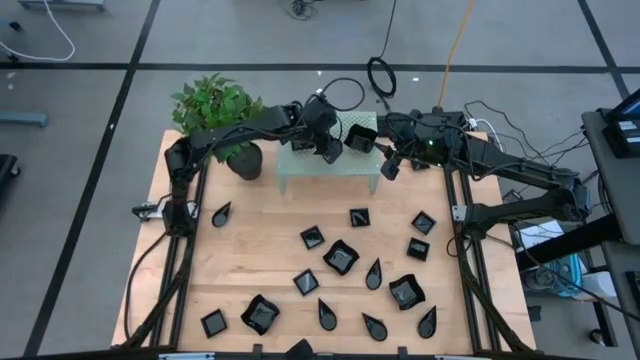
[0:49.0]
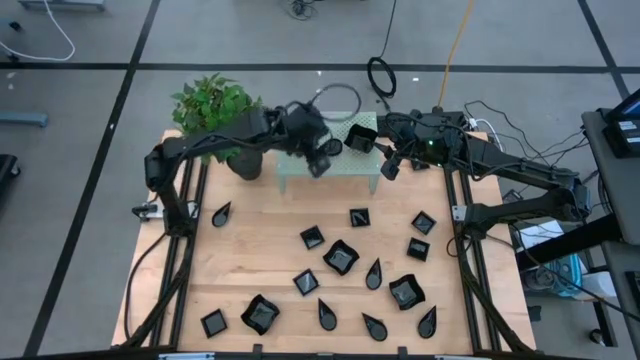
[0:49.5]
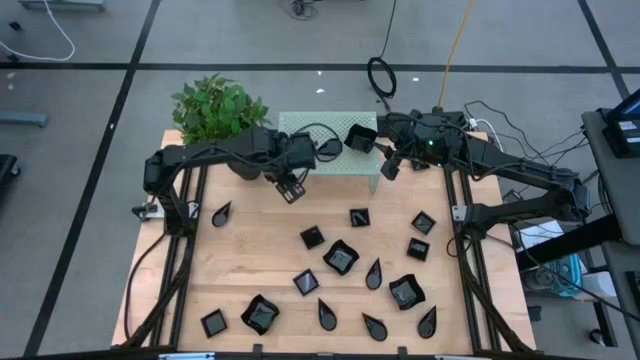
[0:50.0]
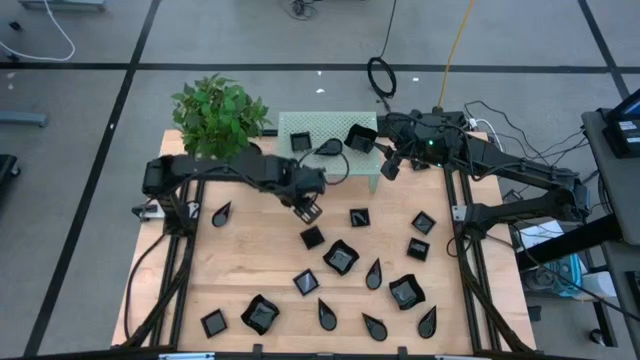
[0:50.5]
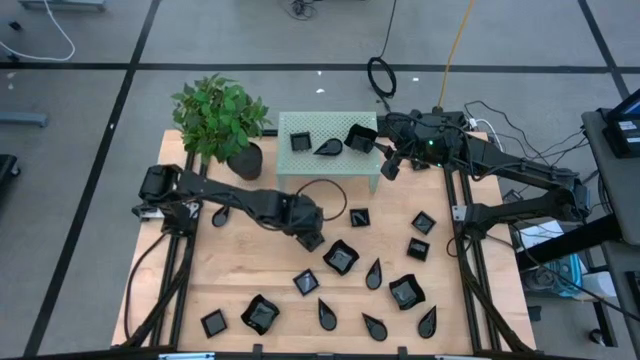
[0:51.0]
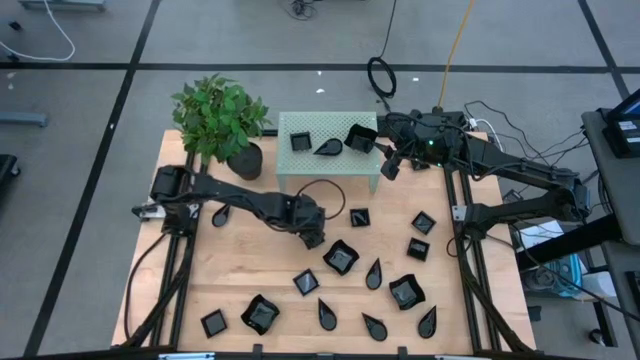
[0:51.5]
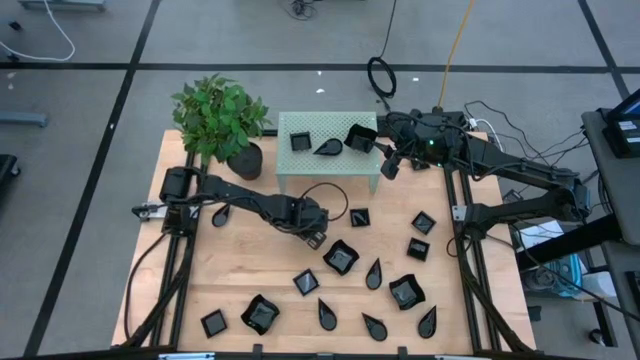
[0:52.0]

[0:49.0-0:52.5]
Task: Pick & Place Mini shaped plates
Stack the square plate on top of the other square plate on the shelf

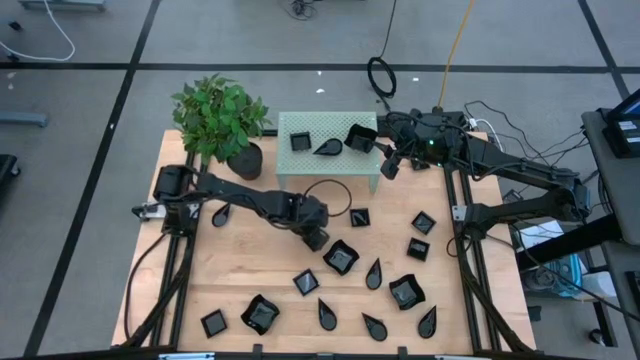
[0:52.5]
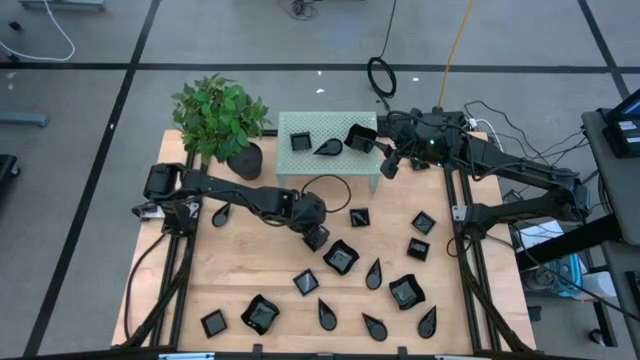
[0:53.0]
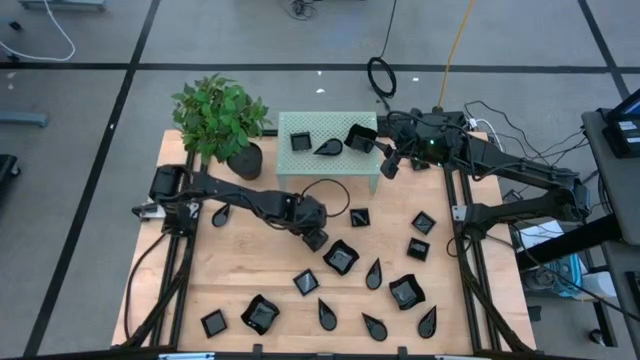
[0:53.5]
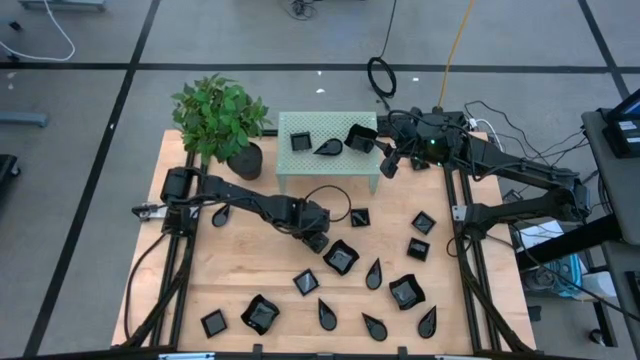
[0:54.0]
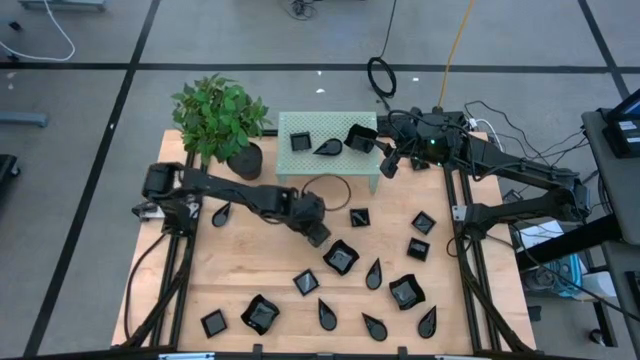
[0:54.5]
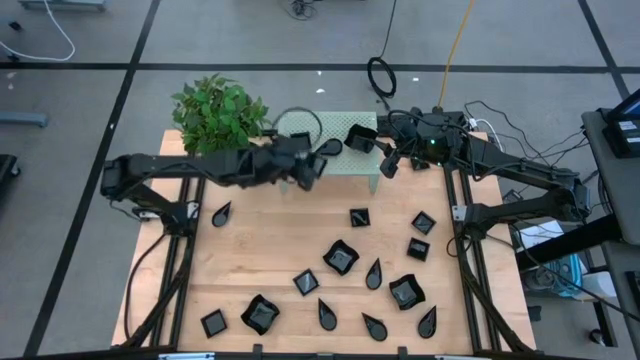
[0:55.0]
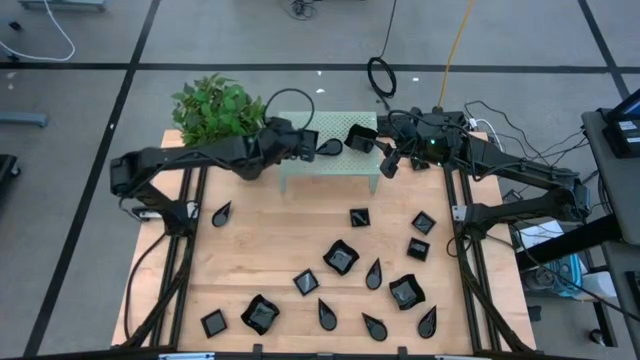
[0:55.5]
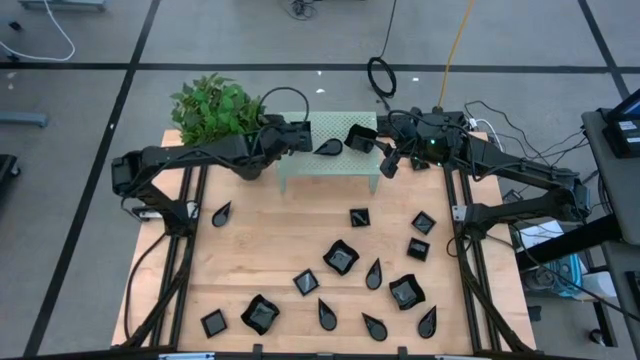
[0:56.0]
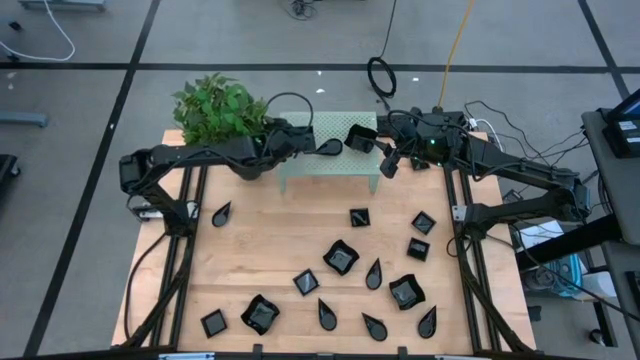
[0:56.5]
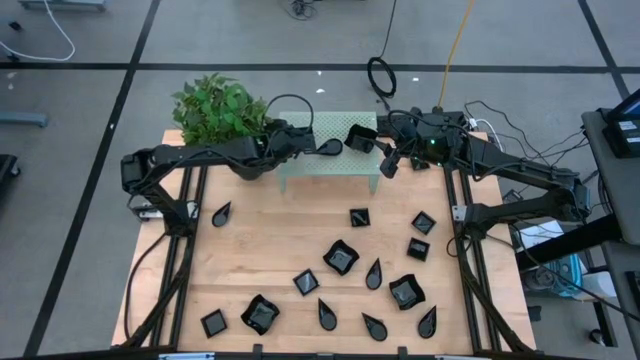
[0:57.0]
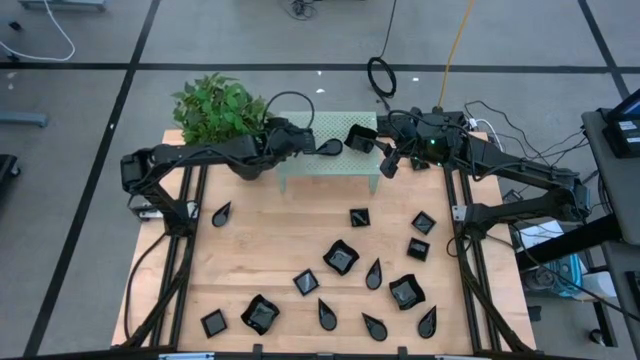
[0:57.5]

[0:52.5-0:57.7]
Stack the square plate on top of the other square plate on the shelf

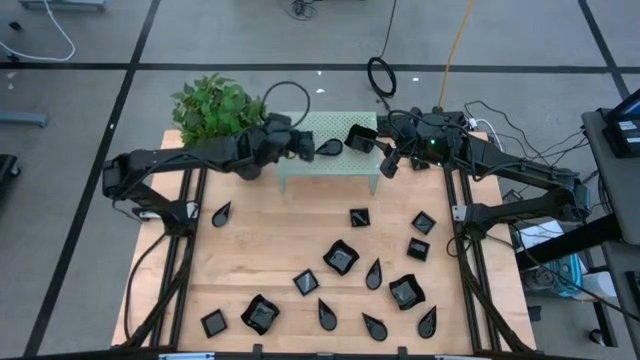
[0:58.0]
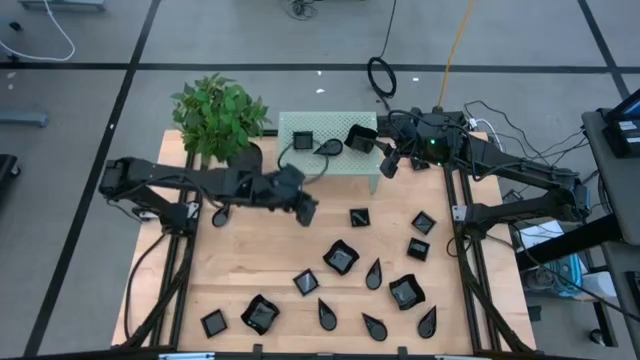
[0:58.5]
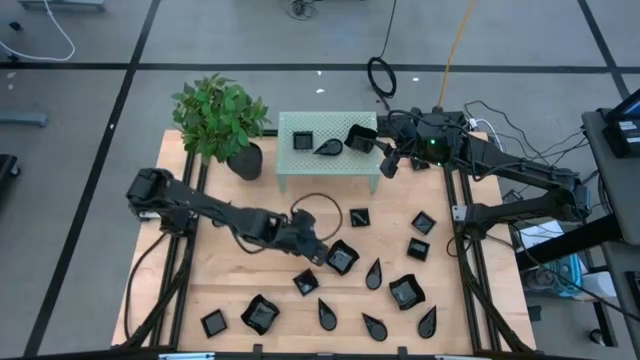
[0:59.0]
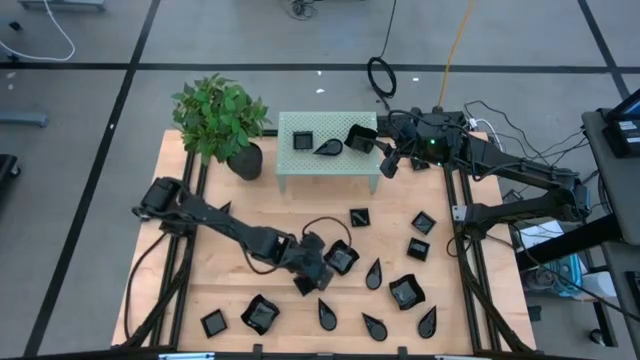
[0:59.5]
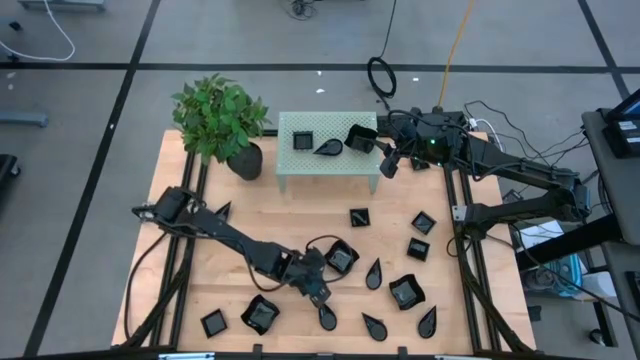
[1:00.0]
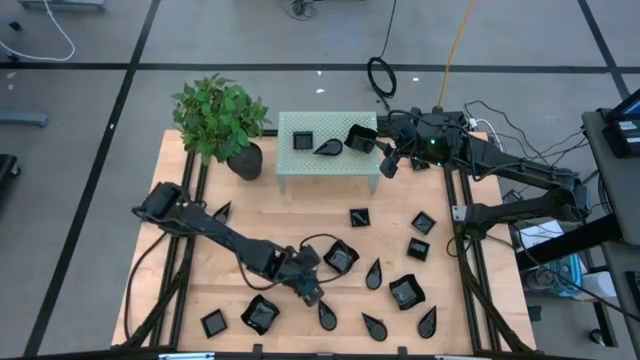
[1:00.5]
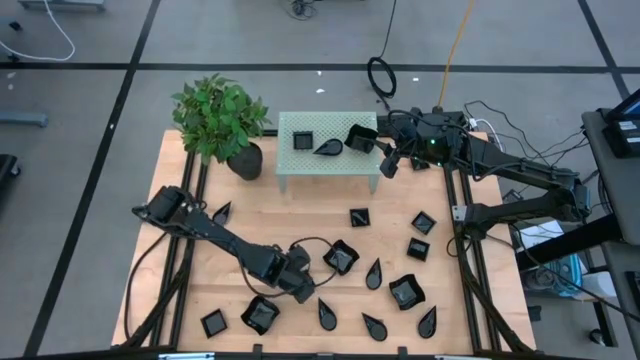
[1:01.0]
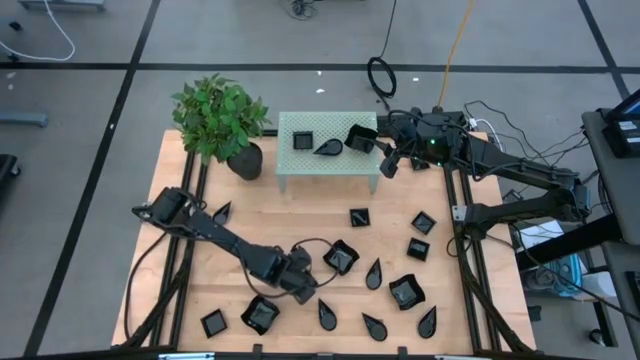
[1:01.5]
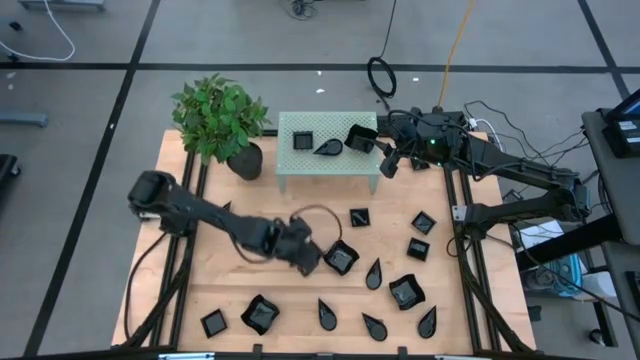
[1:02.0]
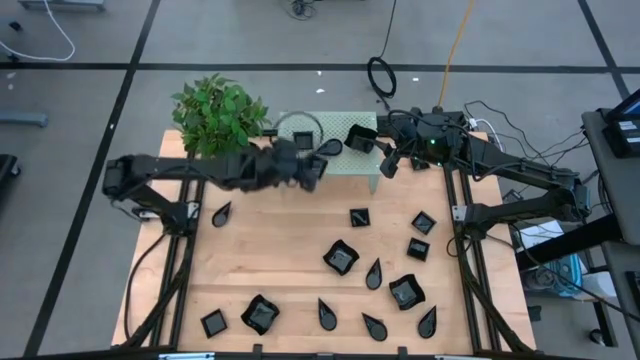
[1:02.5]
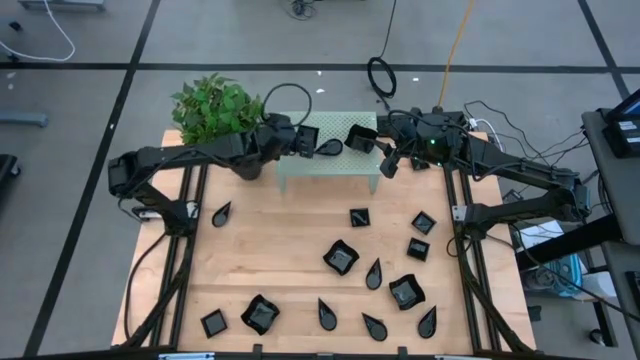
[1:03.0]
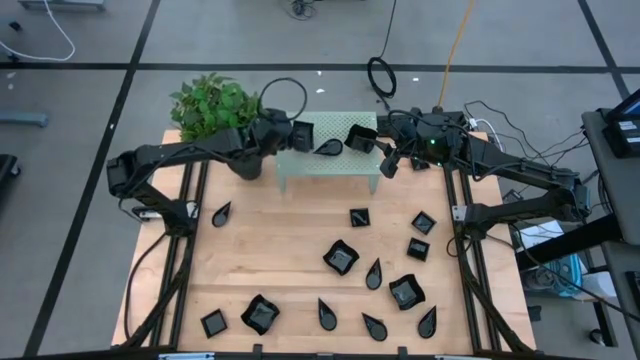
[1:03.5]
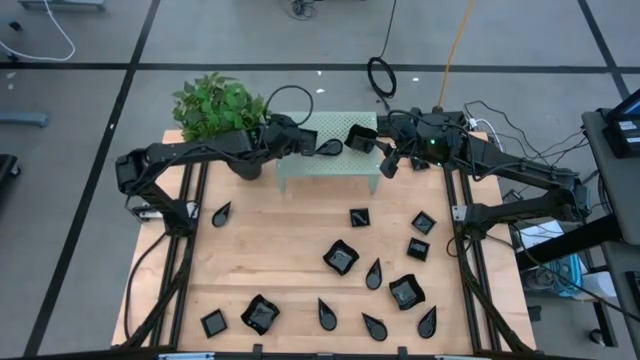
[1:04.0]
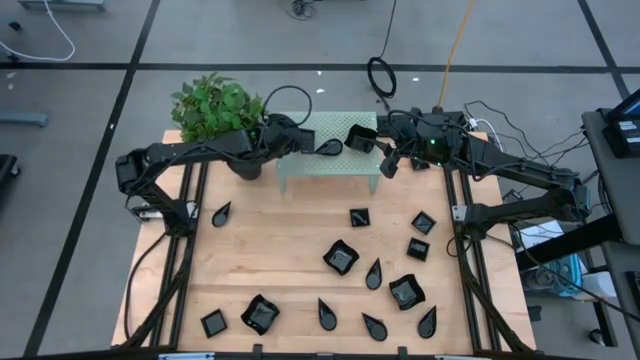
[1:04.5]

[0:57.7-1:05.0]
Stack the square plate on top of the other square plate on the shelf

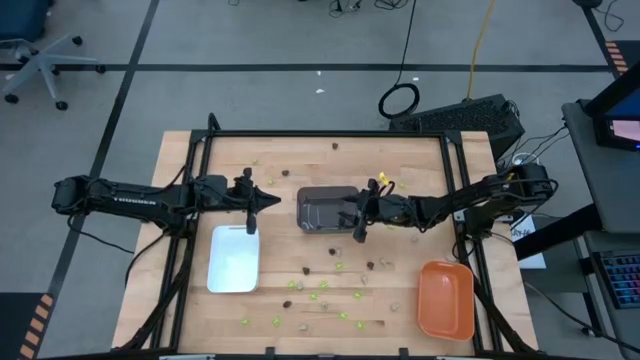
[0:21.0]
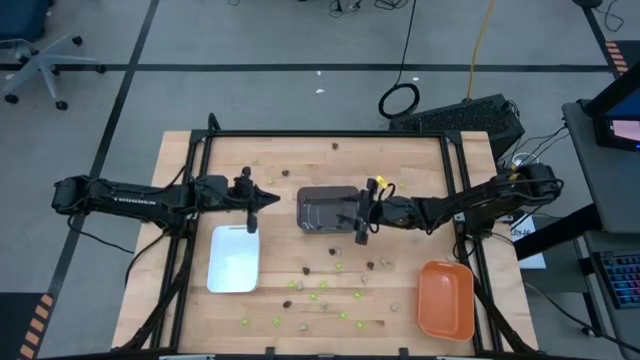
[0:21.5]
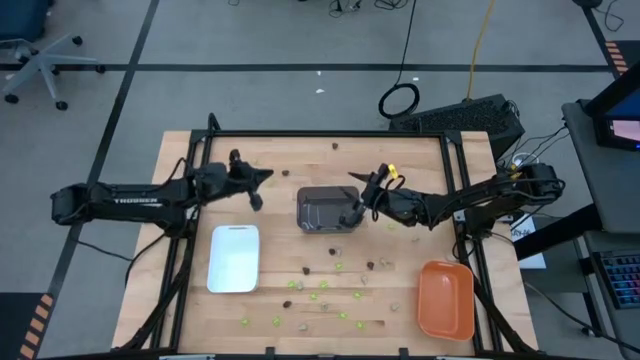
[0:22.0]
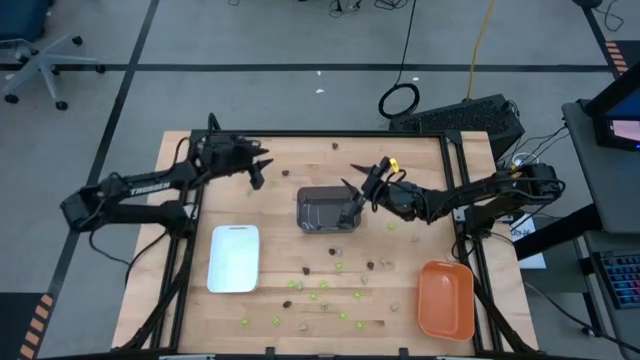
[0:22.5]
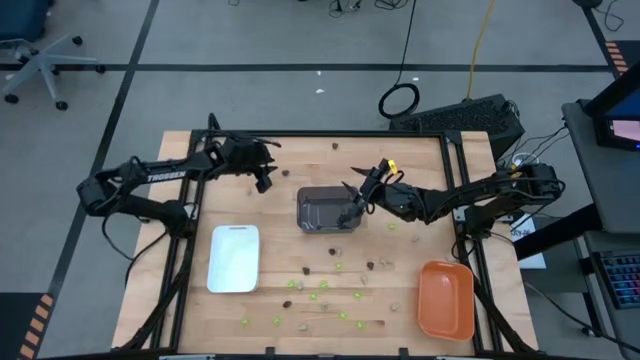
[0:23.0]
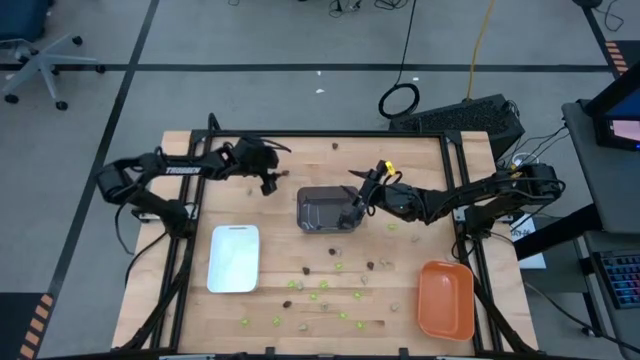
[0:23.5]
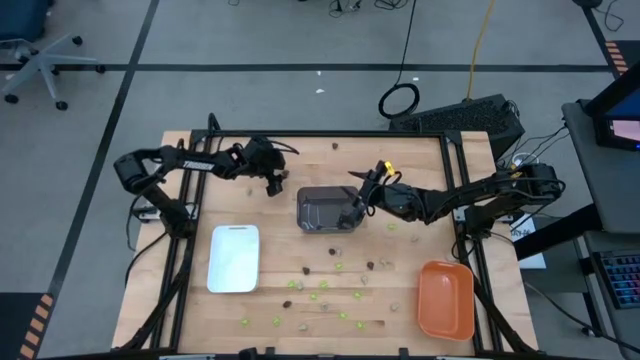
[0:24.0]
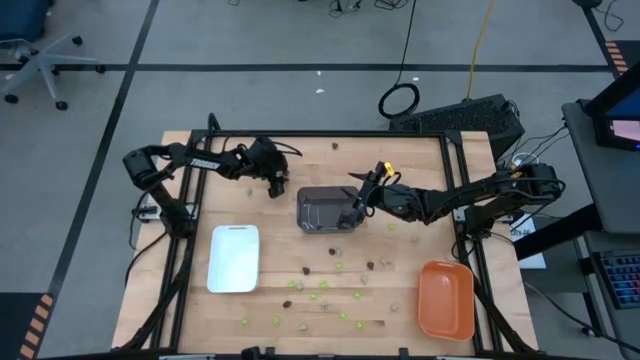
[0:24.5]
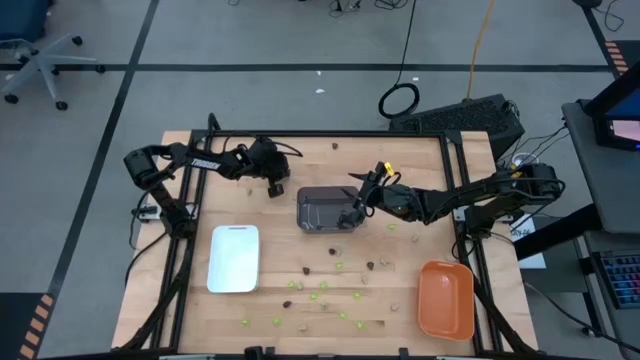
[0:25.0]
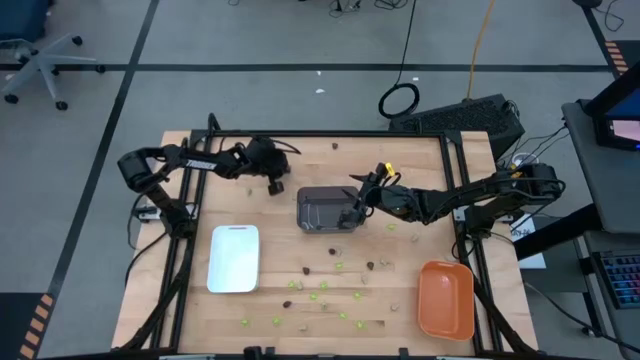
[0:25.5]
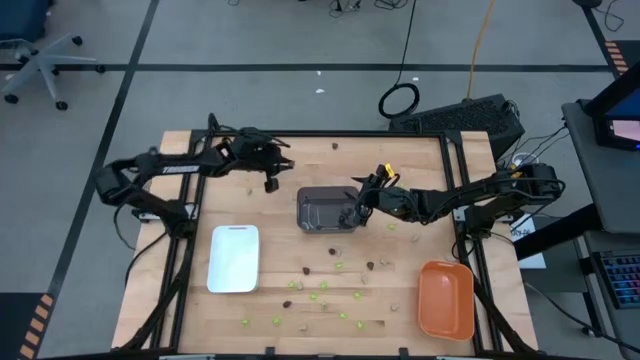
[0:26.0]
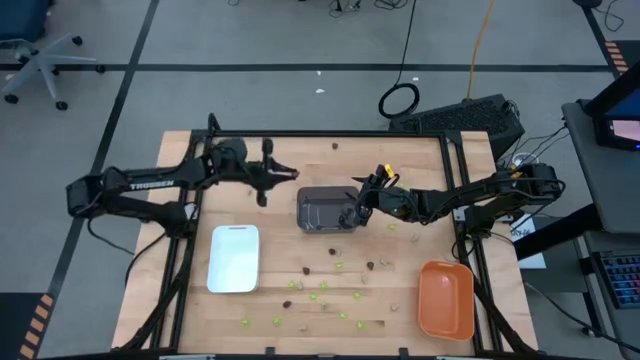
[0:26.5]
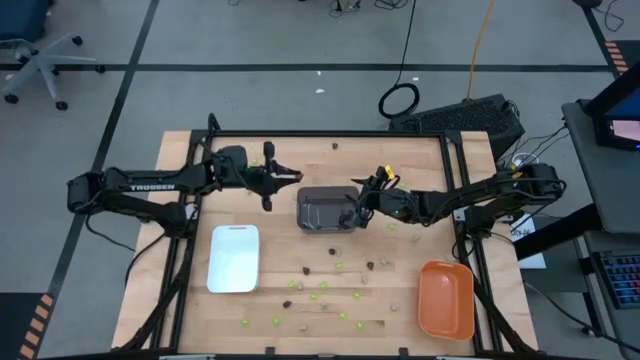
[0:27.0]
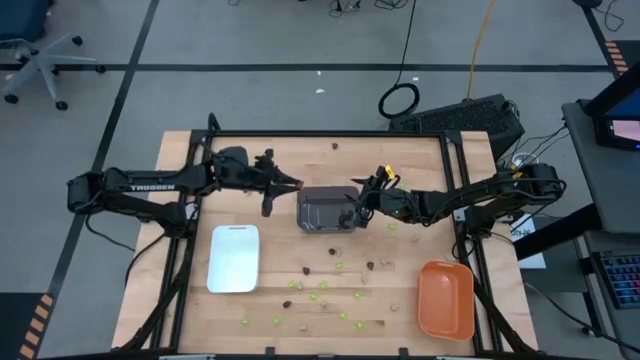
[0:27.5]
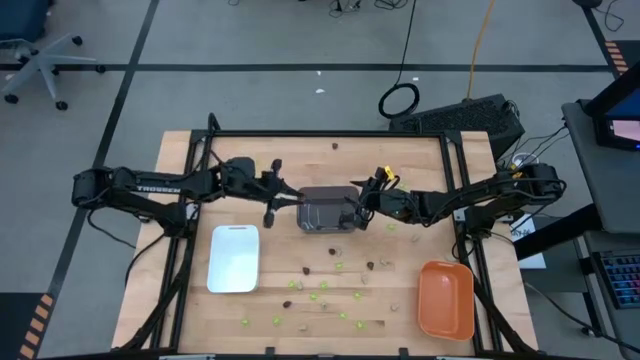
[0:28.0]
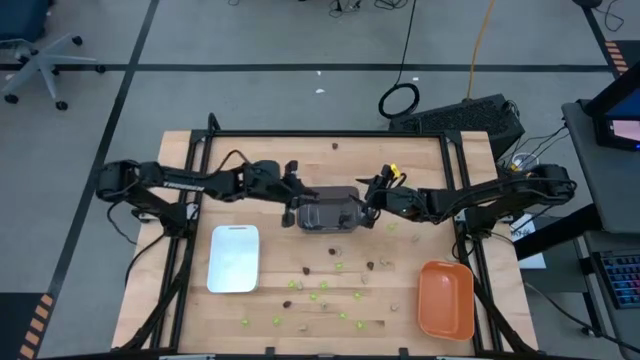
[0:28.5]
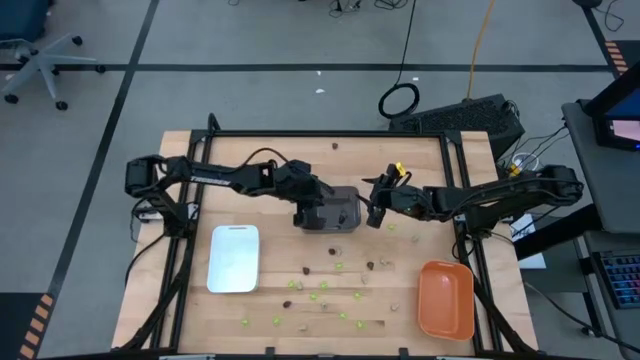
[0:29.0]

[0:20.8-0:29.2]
Task: Sort Halloween decoration
Put the black skull toy into the black bin
